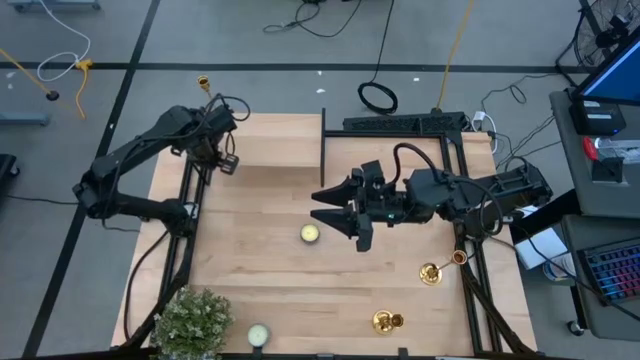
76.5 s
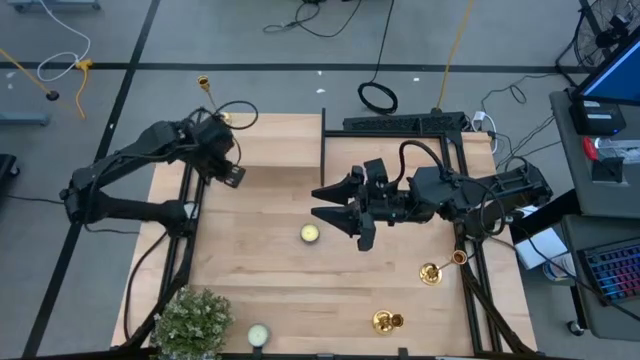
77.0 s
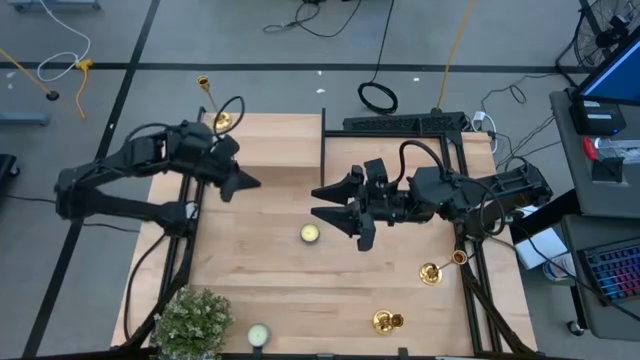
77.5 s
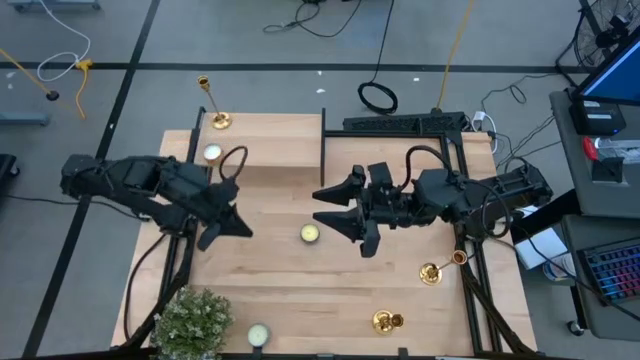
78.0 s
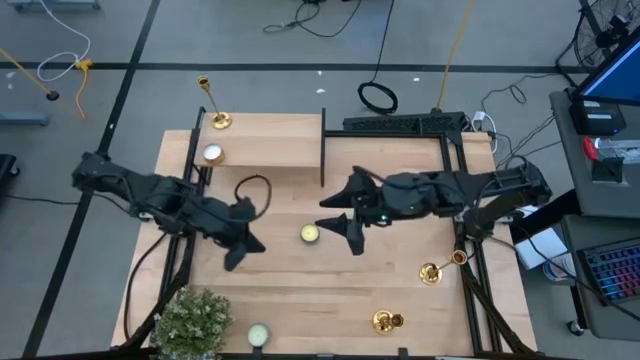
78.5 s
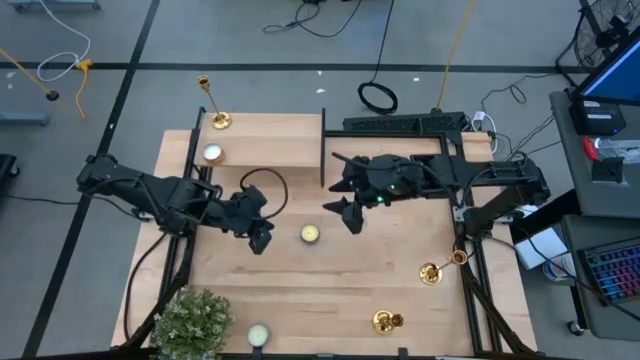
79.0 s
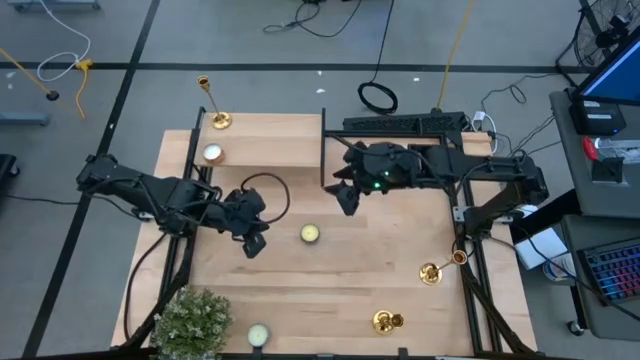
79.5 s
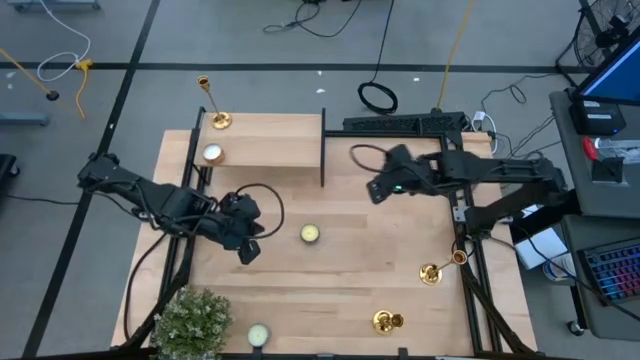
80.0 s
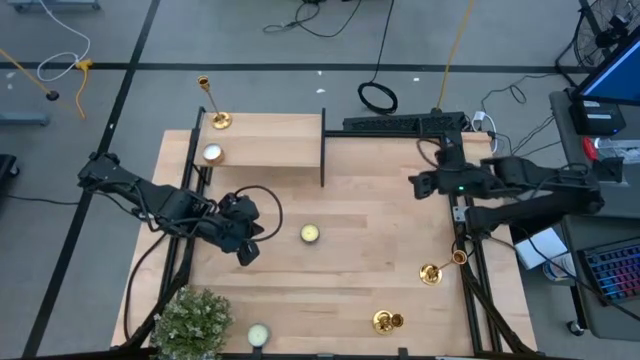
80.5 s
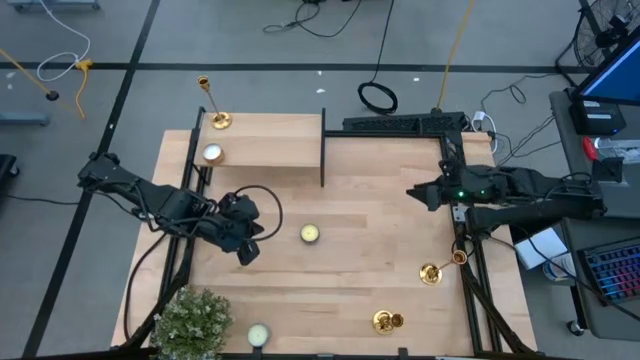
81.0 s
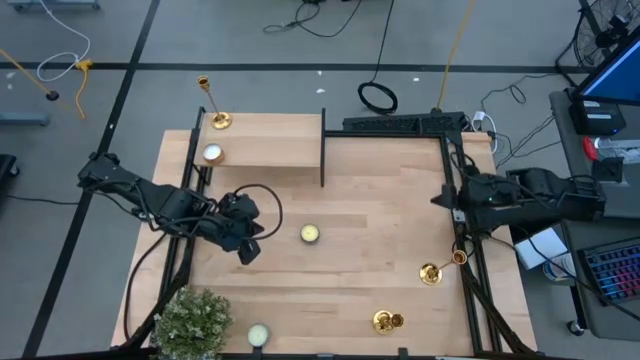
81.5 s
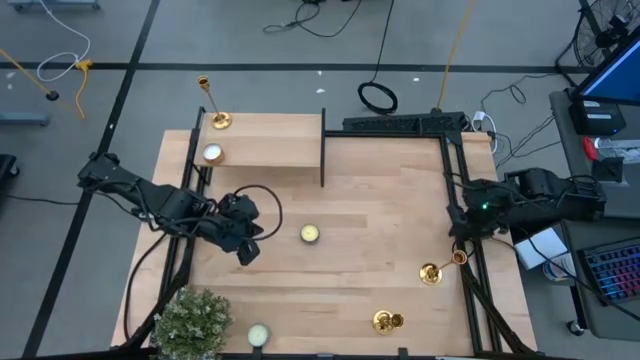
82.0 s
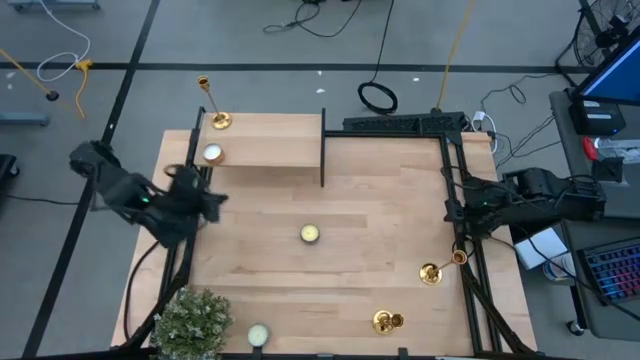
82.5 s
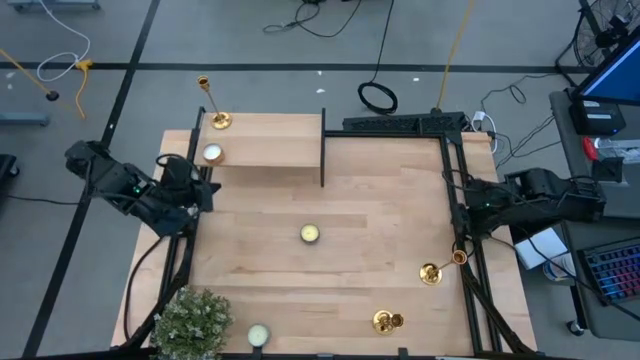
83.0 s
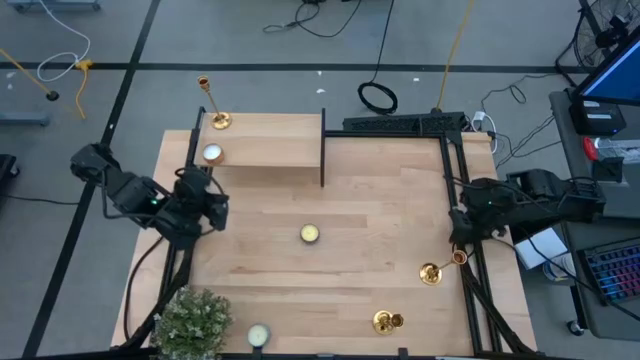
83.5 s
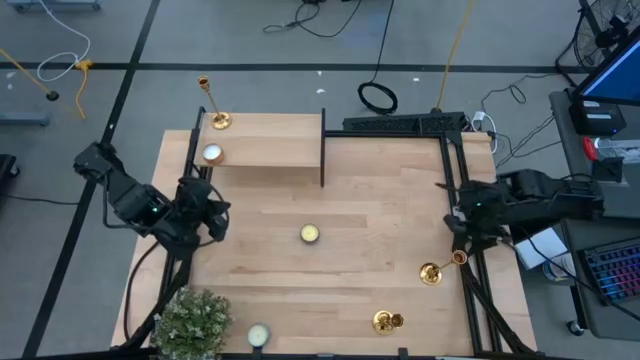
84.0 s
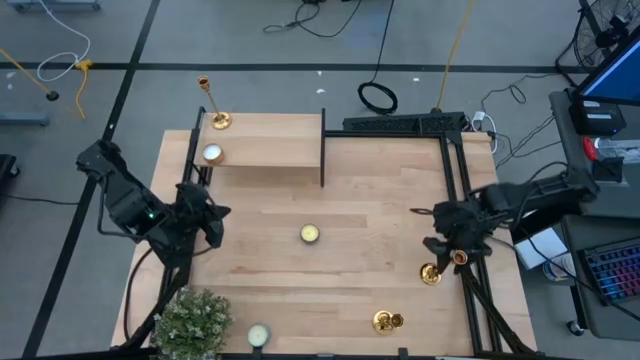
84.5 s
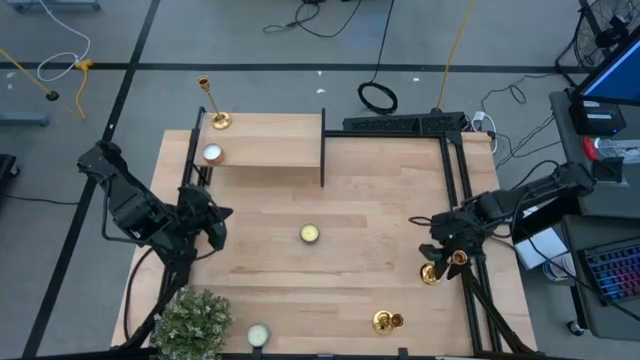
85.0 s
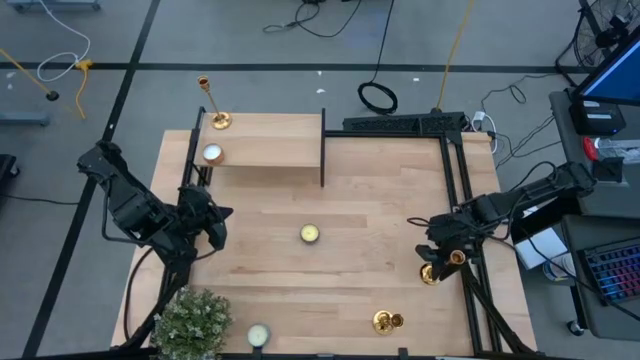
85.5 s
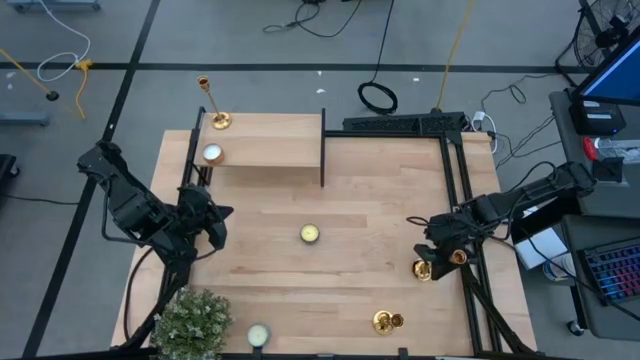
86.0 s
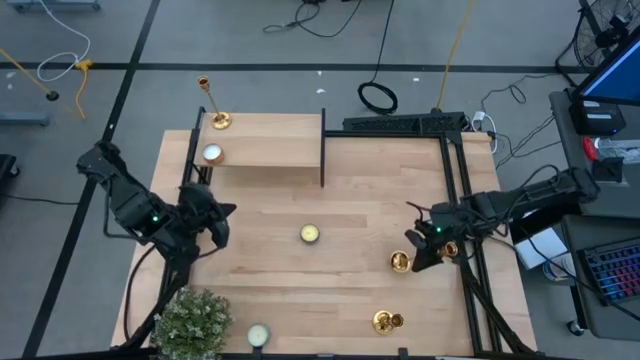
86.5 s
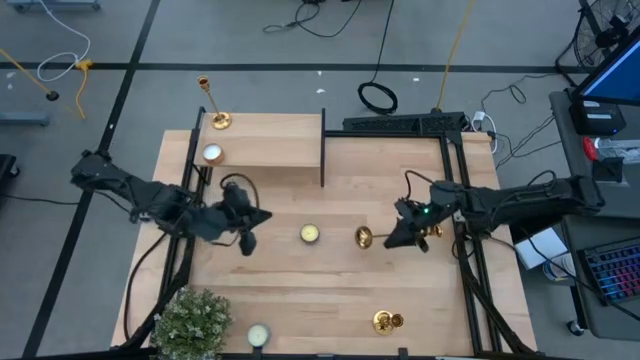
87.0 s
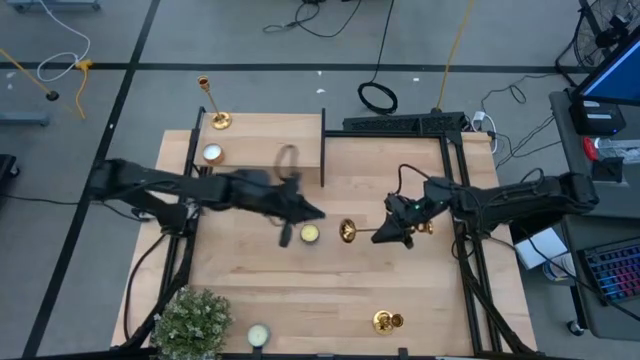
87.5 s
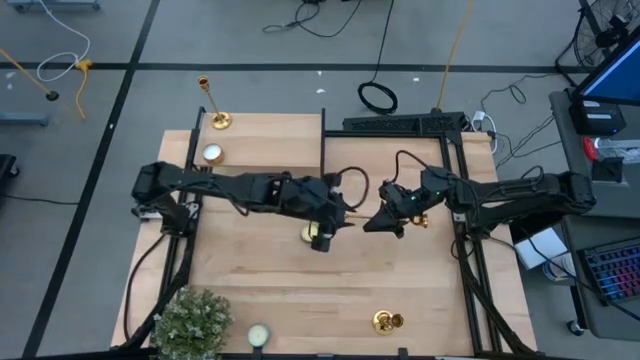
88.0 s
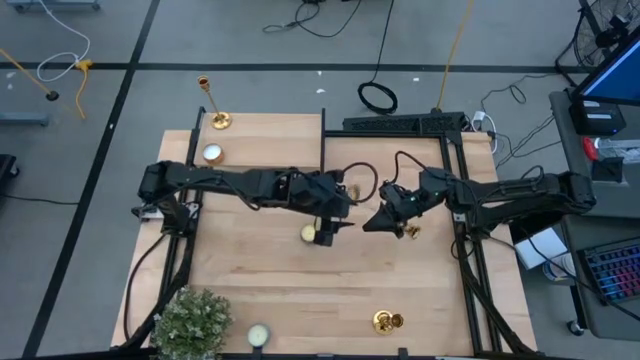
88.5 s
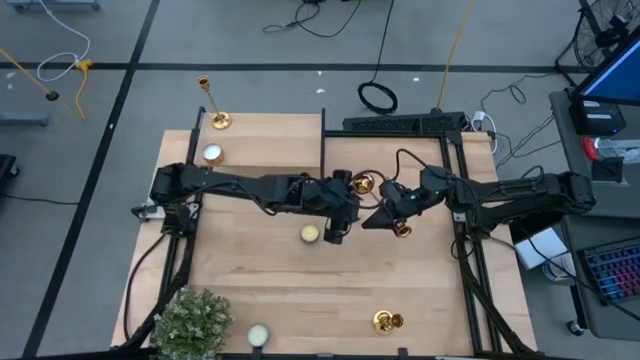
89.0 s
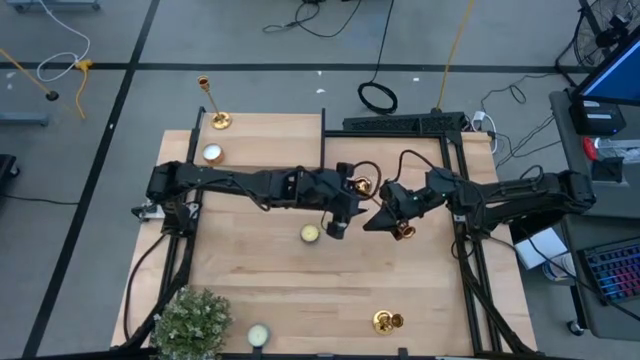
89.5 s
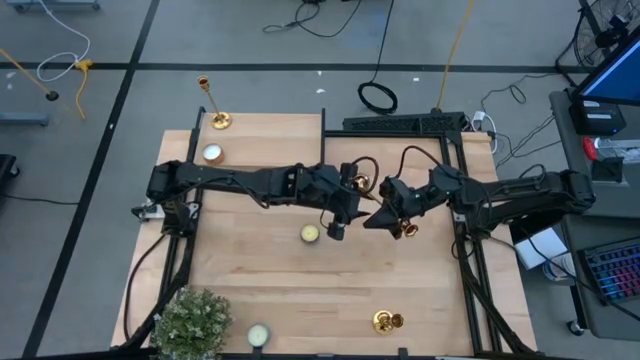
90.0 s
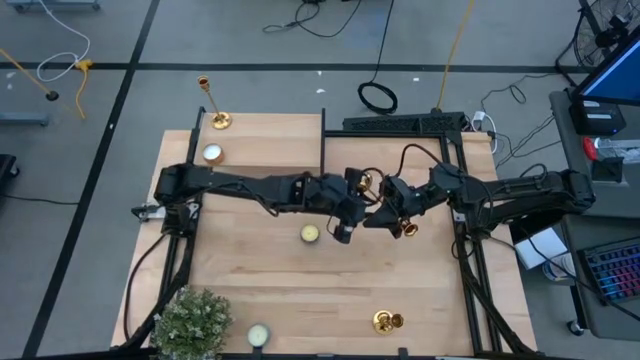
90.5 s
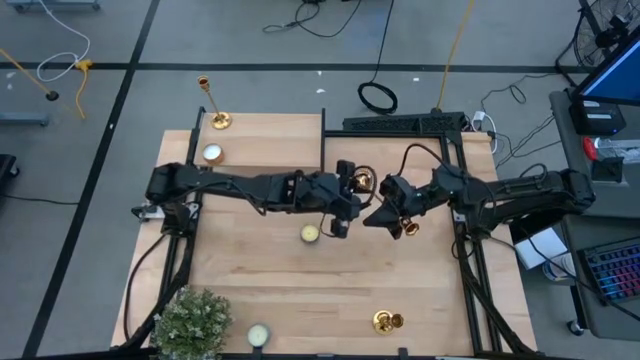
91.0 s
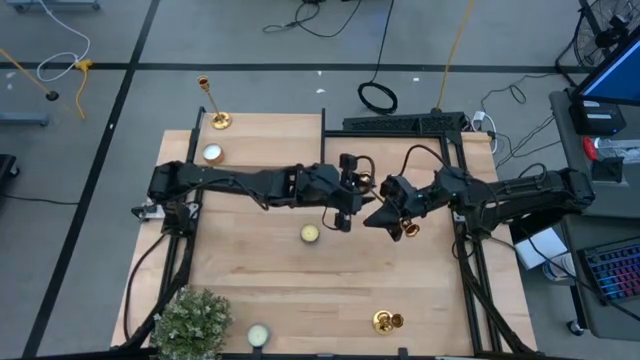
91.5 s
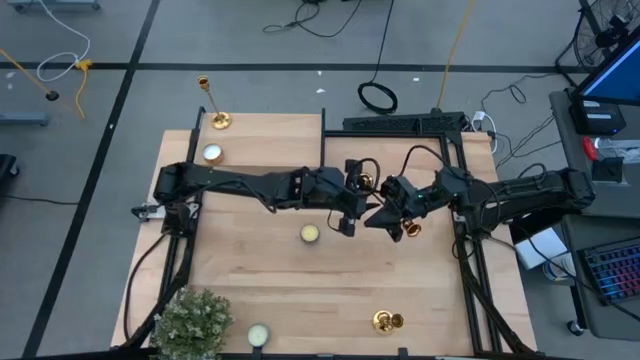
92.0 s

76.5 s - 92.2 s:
Task: Pick & Place candle stick holders
Put the top gold candle holder on the shelf
